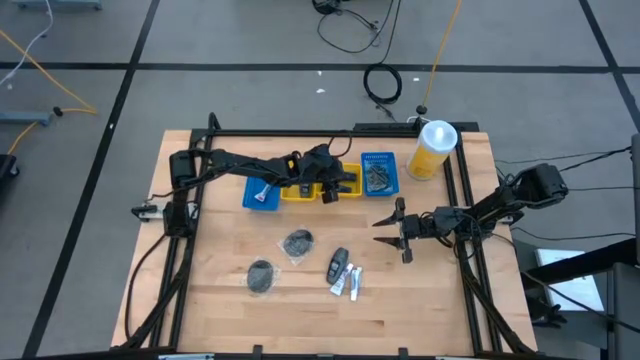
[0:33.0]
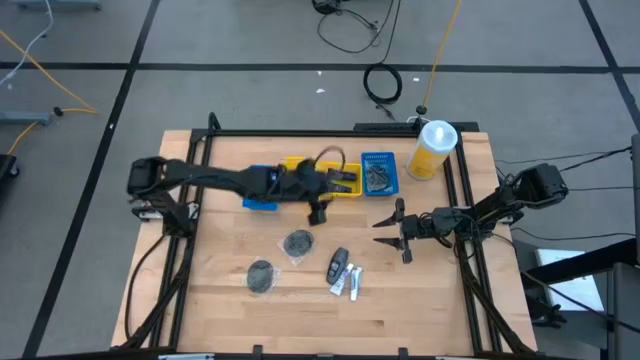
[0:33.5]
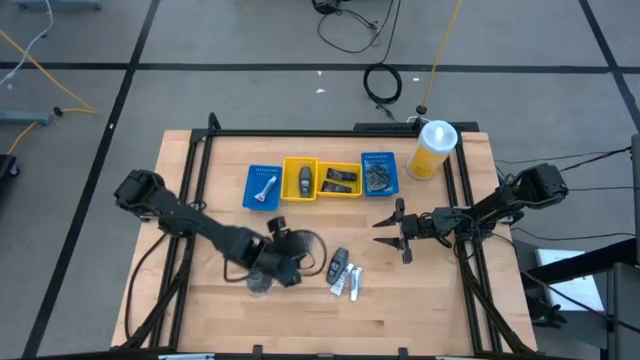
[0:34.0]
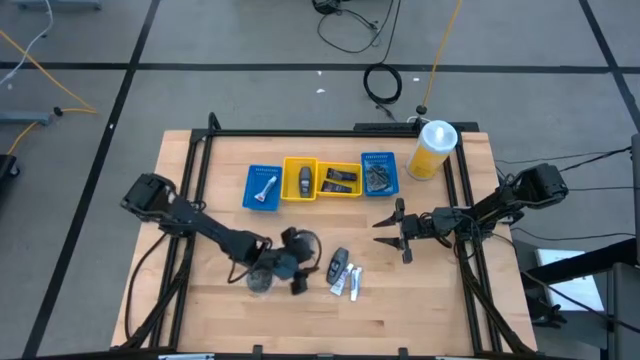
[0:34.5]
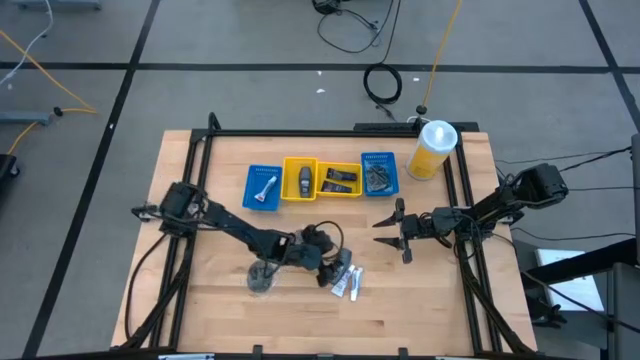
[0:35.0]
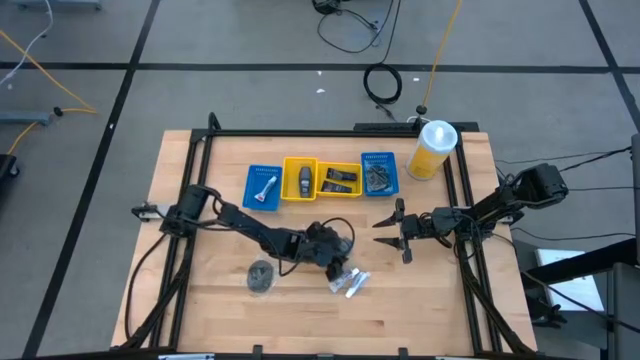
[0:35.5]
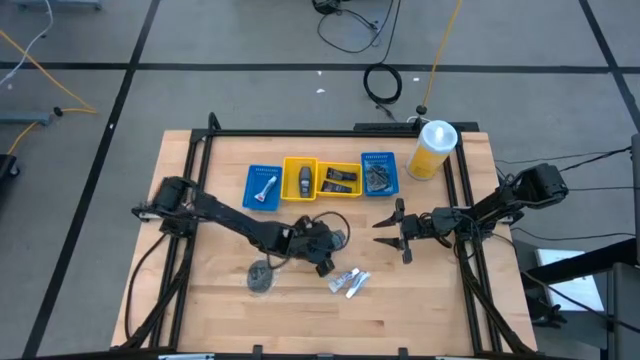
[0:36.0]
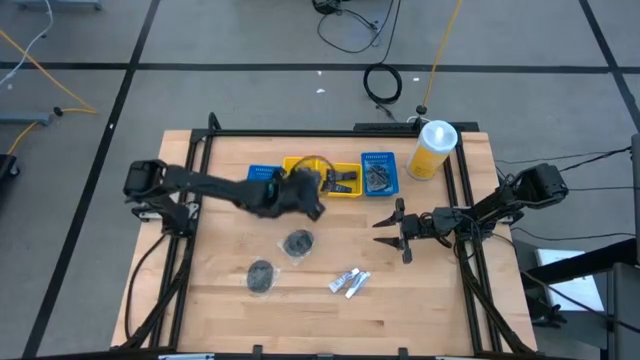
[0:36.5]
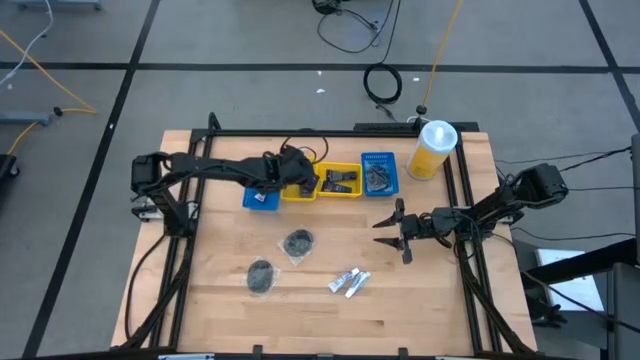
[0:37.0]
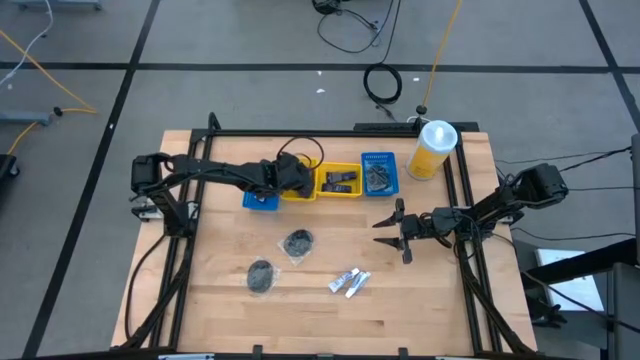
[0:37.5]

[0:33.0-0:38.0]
Task: Pick & Place Travel size toiletries
Put the deodorant into the left yellow basket

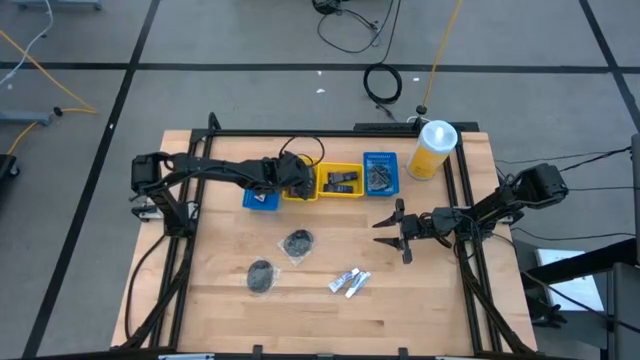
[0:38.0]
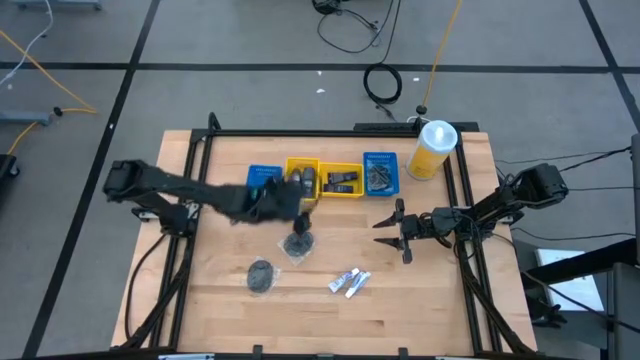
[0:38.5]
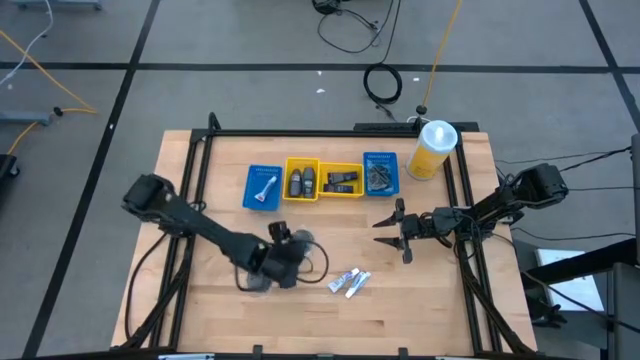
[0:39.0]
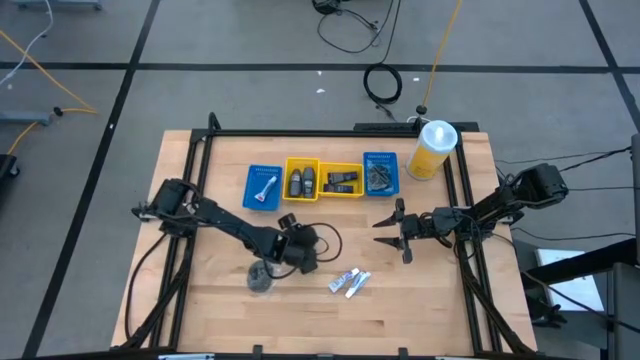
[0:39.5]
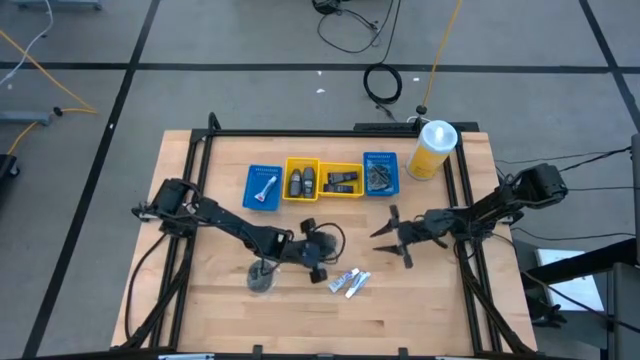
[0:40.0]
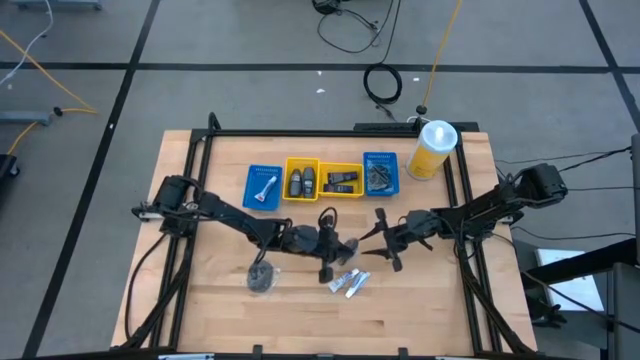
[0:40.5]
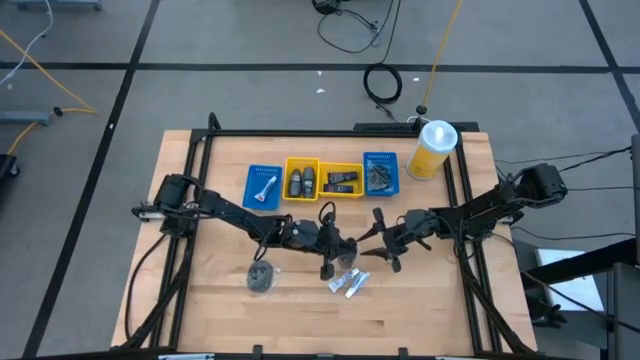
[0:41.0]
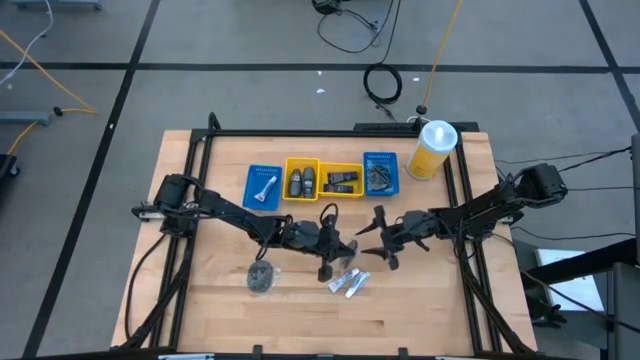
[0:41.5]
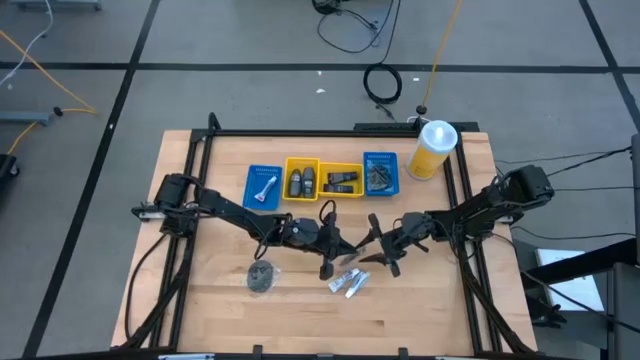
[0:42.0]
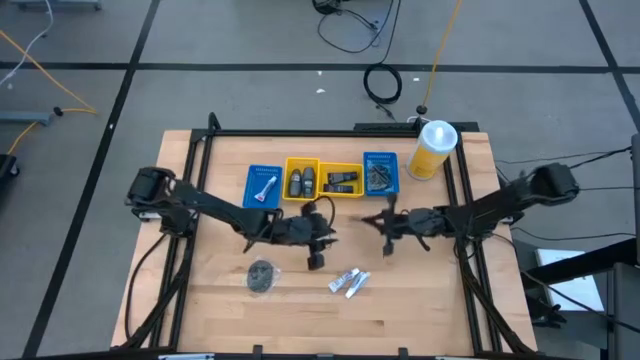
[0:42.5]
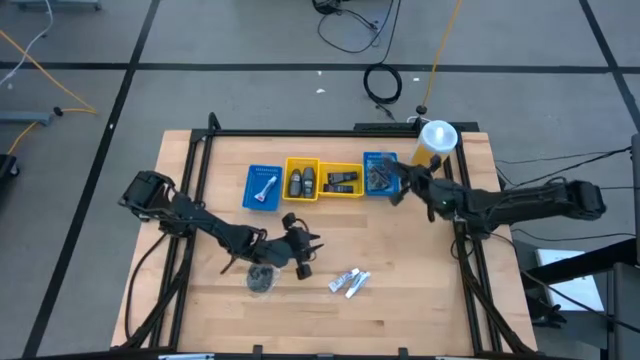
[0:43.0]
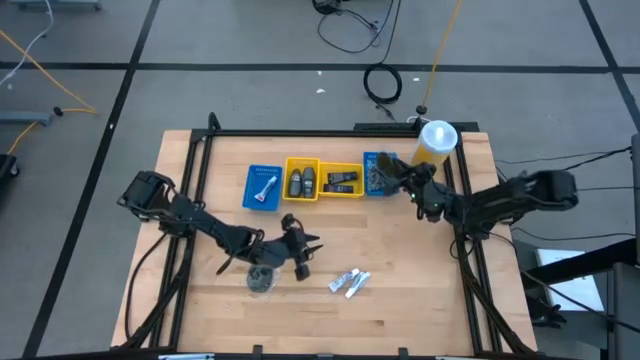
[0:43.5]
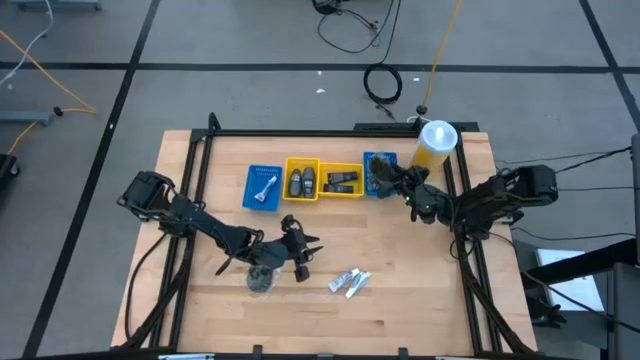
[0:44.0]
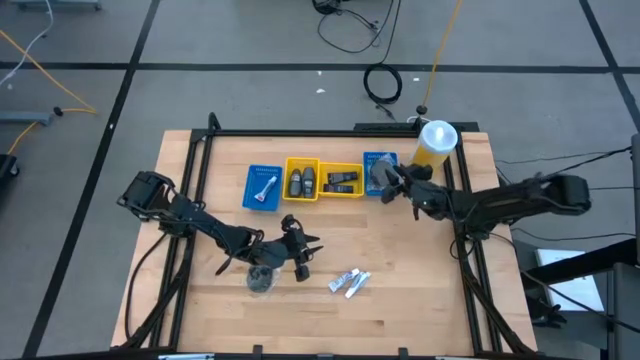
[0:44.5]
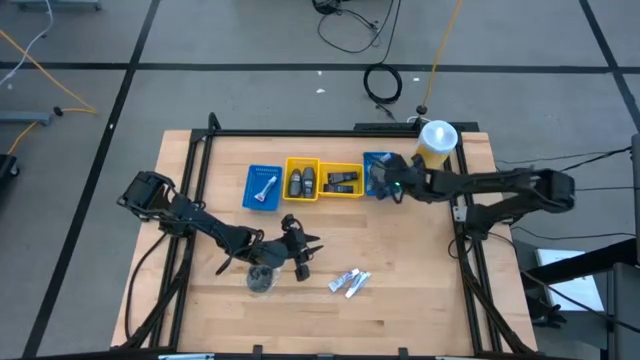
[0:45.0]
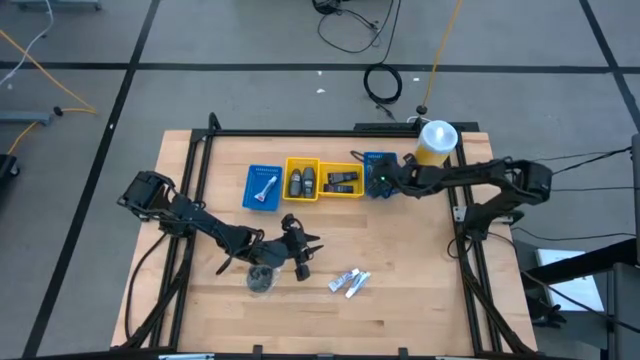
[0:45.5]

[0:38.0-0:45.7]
Put the hairbrush into the right blue basket

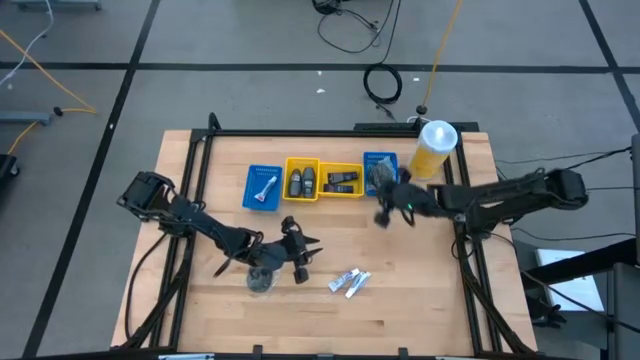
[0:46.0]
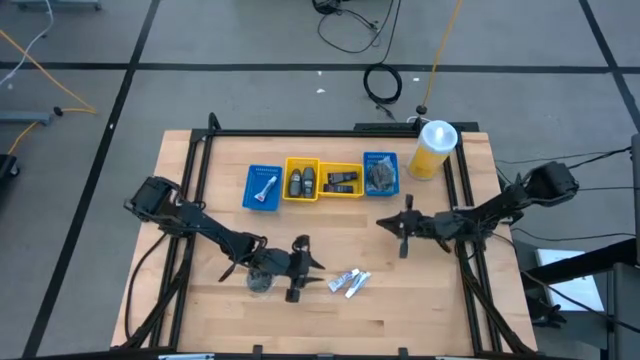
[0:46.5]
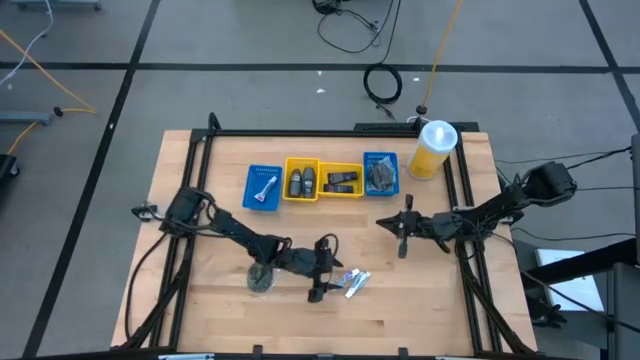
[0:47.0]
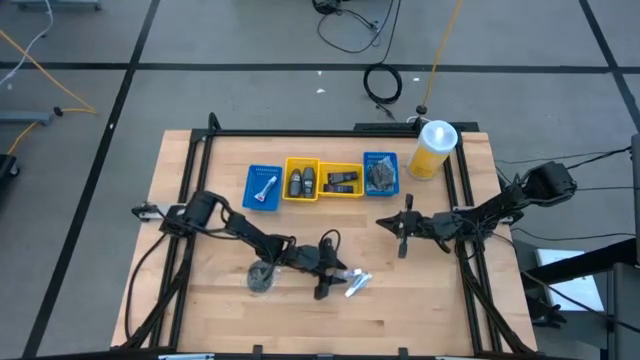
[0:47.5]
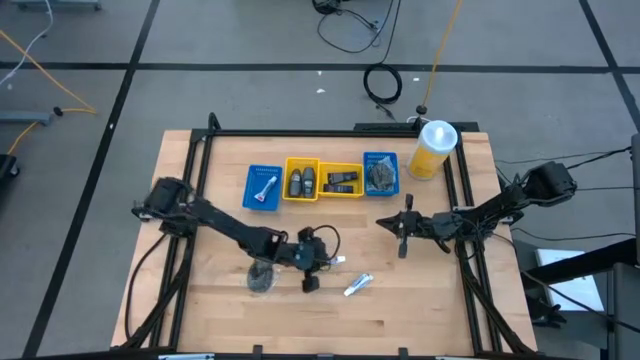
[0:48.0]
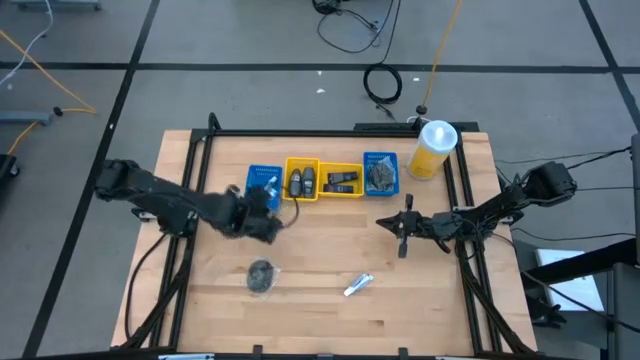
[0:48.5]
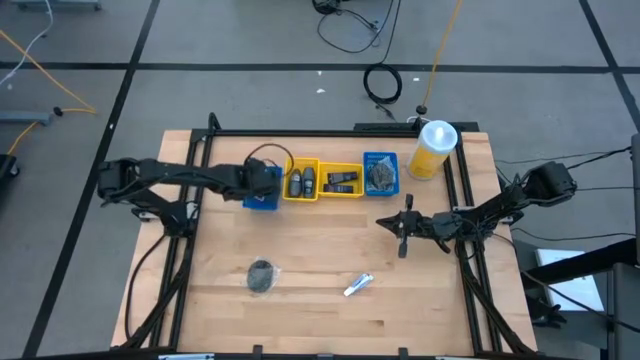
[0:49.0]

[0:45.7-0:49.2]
Put the toothpaste into the left blue basket

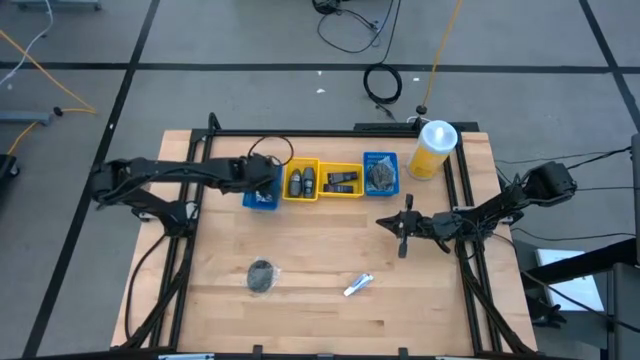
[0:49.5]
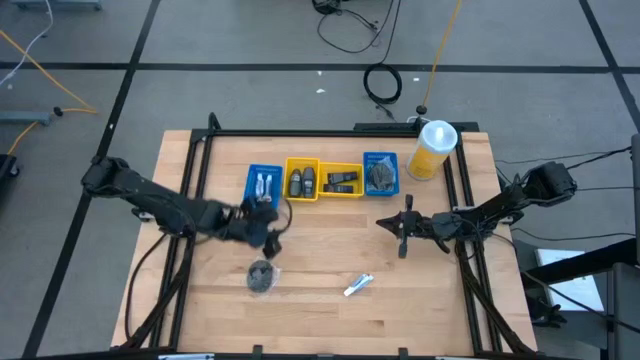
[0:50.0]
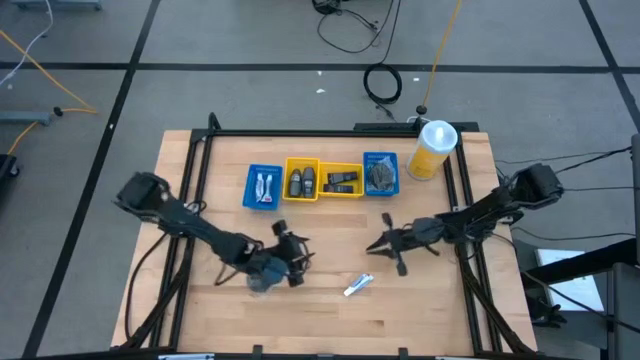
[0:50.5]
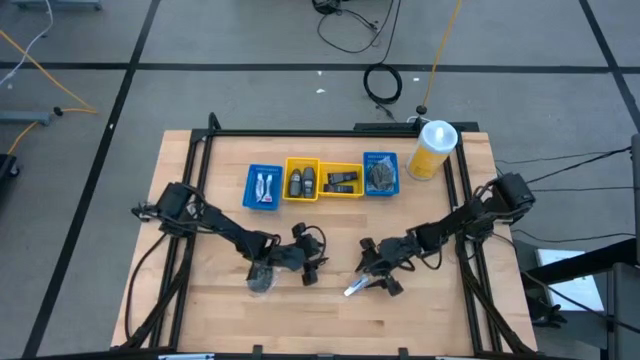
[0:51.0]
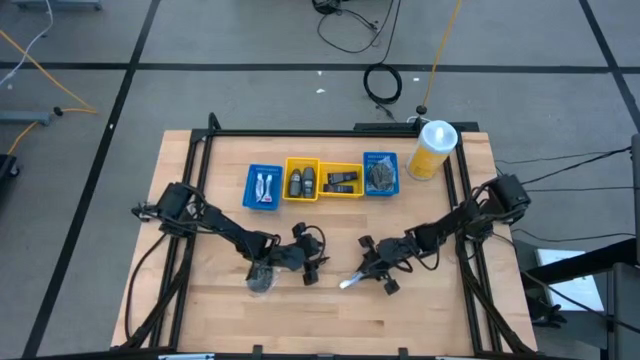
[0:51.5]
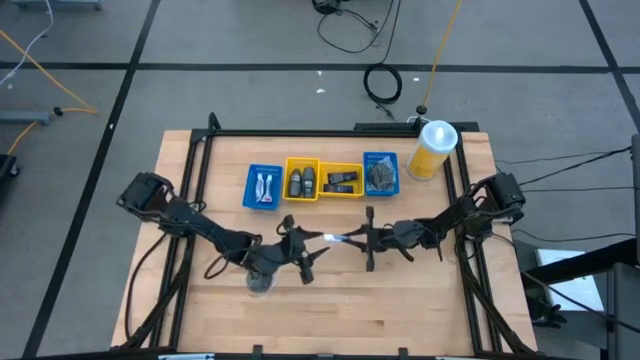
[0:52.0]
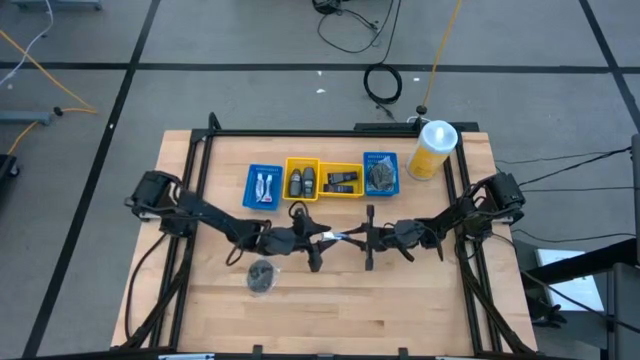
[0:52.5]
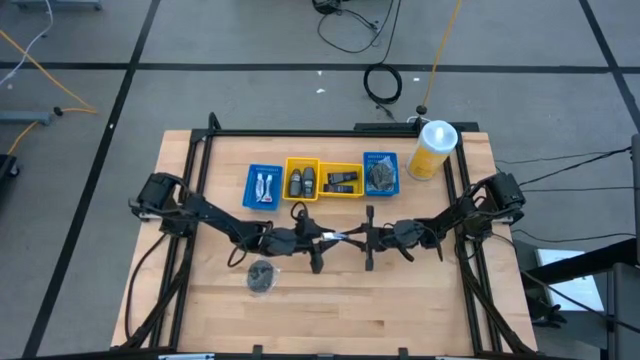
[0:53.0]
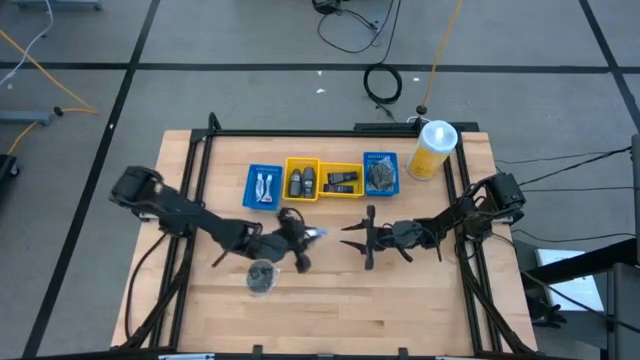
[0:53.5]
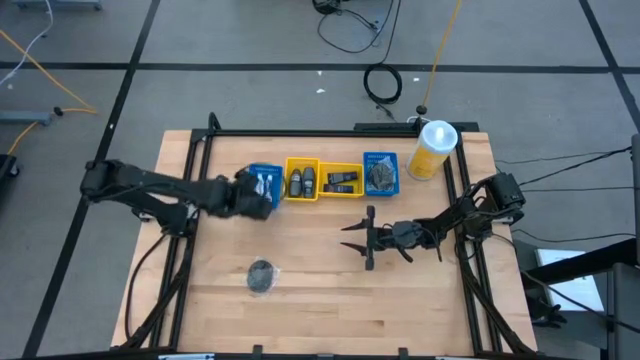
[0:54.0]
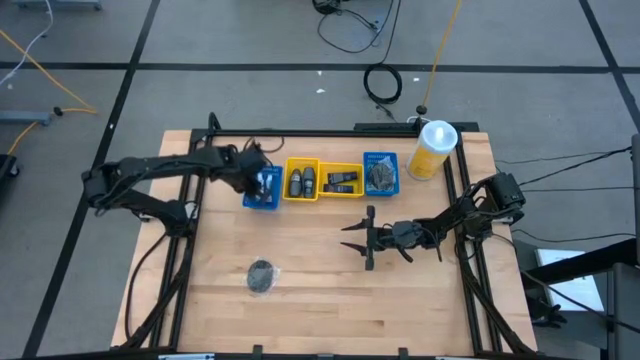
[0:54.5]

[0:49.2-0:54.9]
Put the toothpaste into the left blue basket
